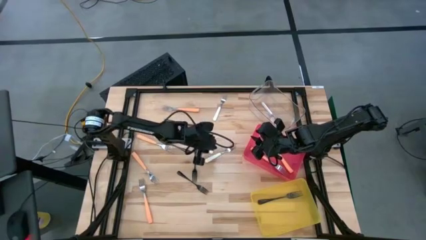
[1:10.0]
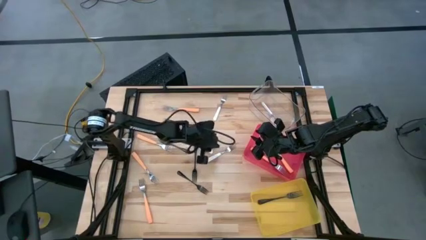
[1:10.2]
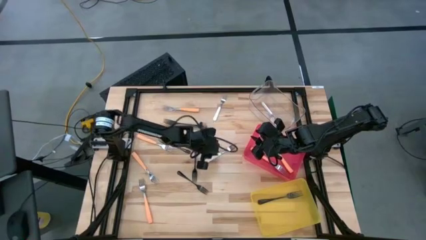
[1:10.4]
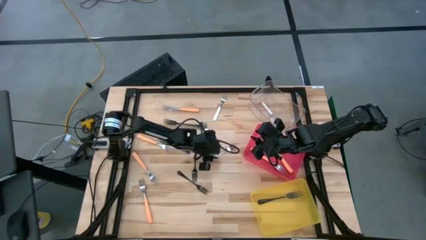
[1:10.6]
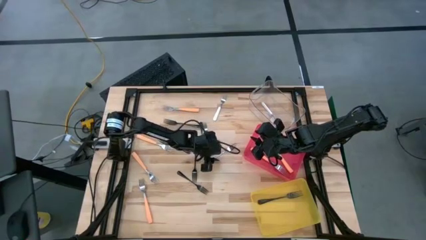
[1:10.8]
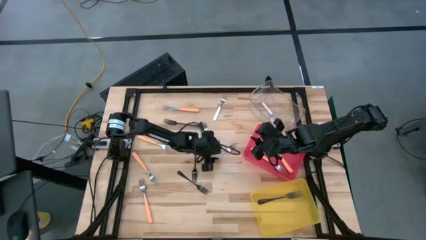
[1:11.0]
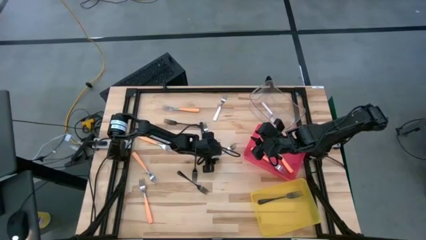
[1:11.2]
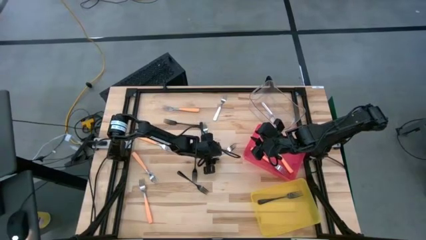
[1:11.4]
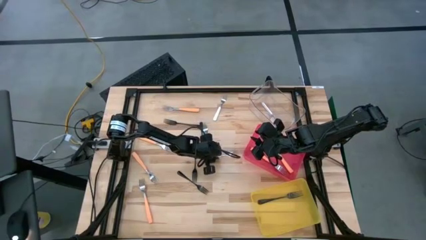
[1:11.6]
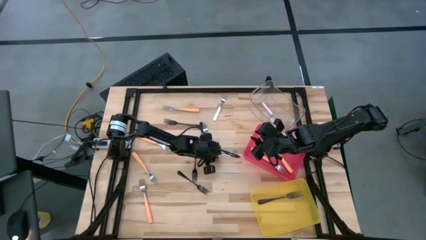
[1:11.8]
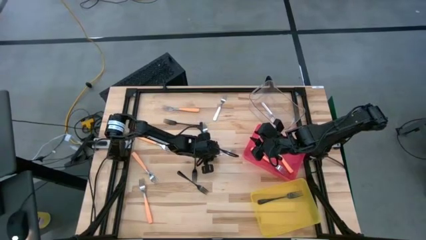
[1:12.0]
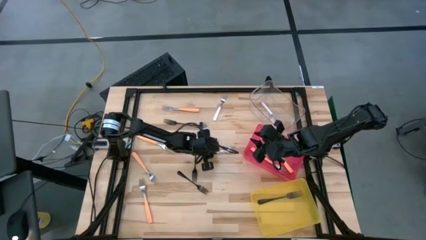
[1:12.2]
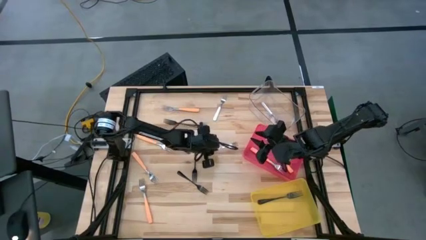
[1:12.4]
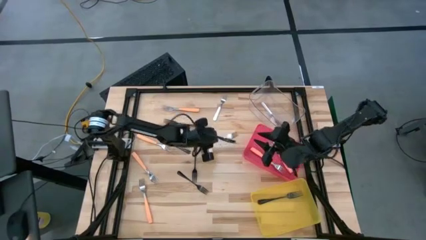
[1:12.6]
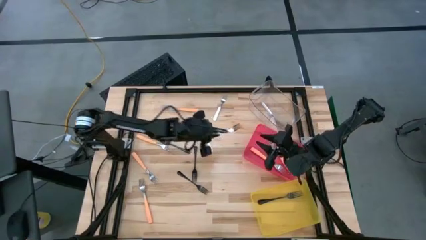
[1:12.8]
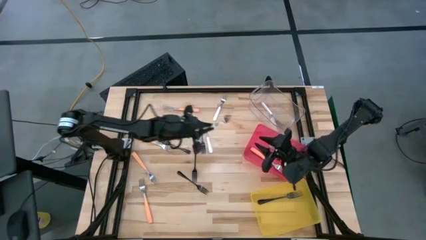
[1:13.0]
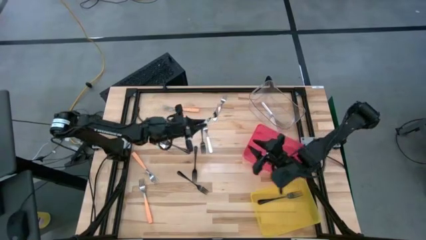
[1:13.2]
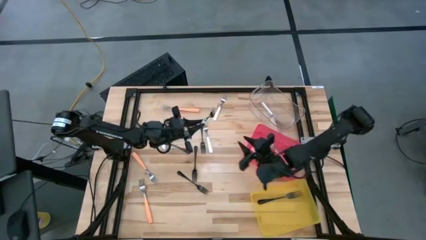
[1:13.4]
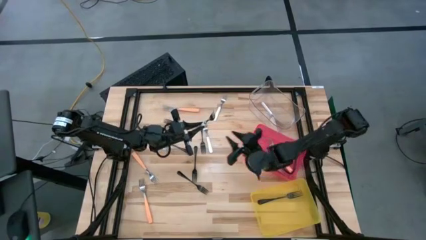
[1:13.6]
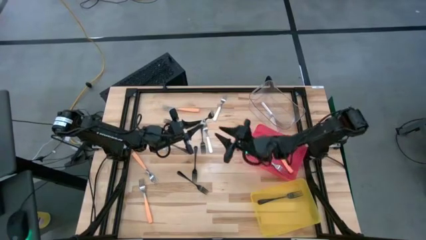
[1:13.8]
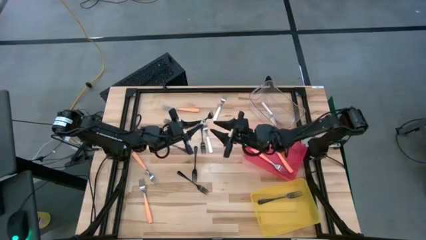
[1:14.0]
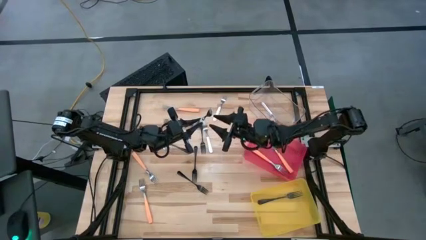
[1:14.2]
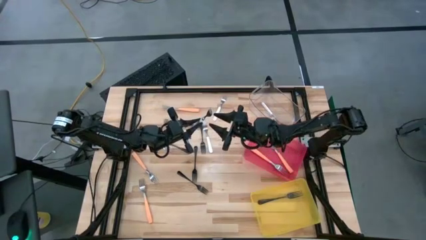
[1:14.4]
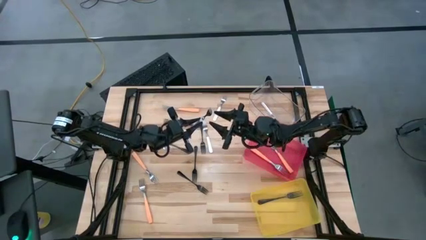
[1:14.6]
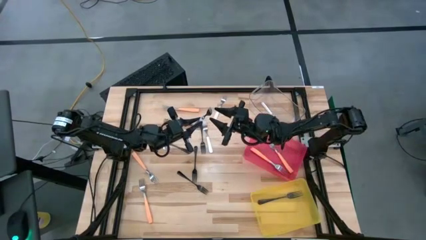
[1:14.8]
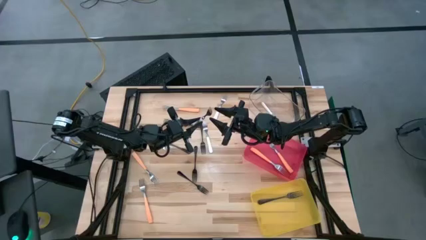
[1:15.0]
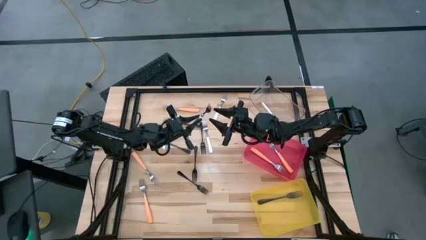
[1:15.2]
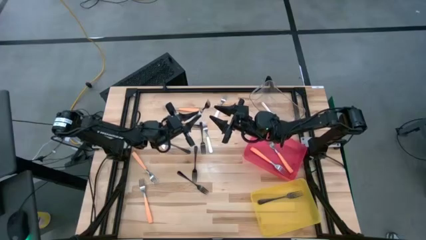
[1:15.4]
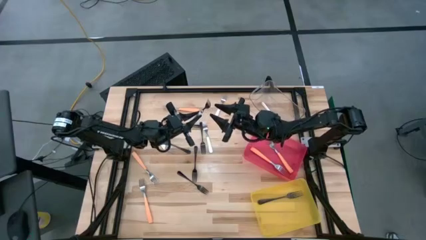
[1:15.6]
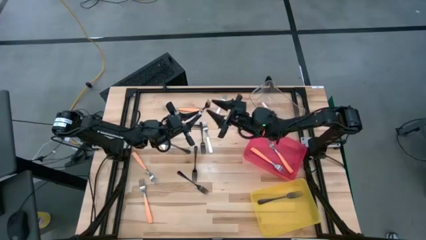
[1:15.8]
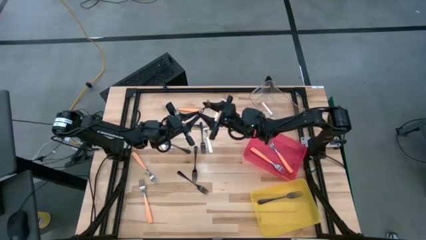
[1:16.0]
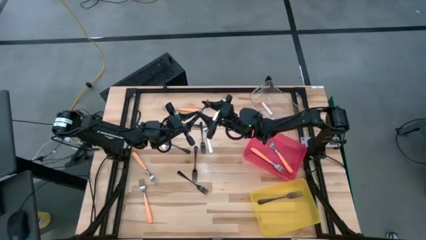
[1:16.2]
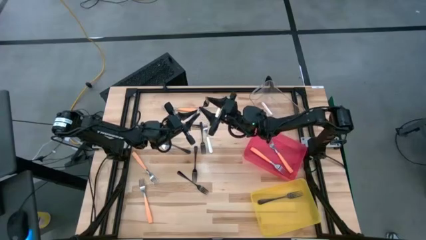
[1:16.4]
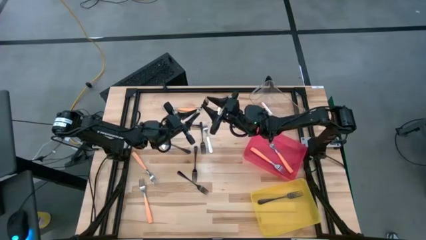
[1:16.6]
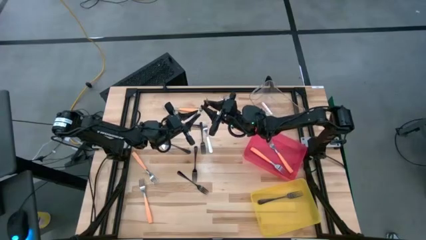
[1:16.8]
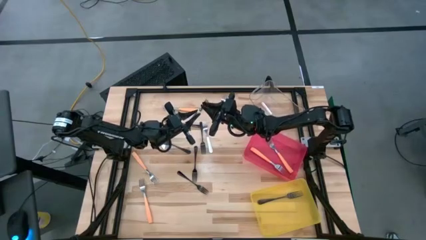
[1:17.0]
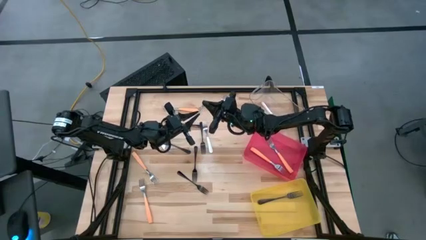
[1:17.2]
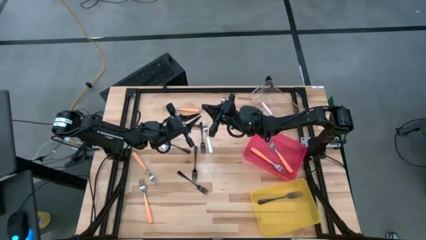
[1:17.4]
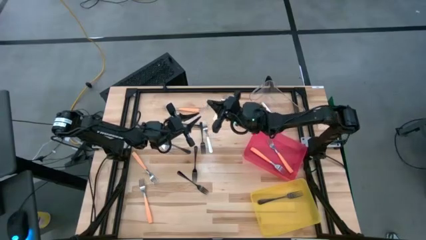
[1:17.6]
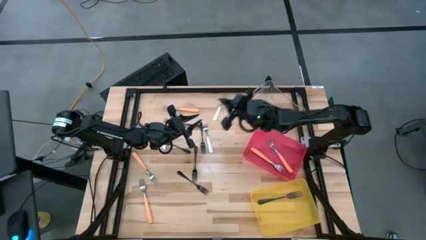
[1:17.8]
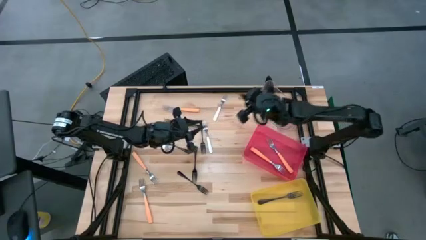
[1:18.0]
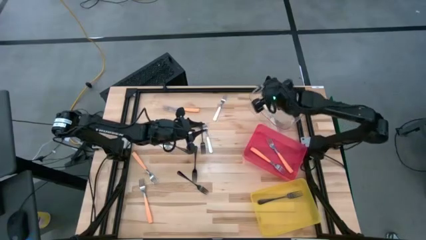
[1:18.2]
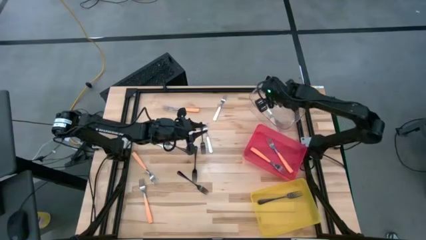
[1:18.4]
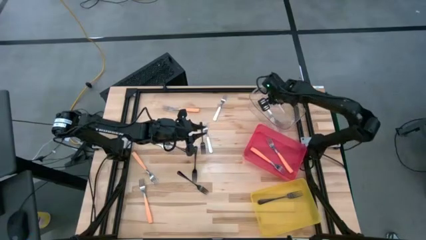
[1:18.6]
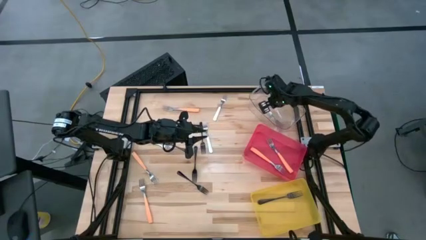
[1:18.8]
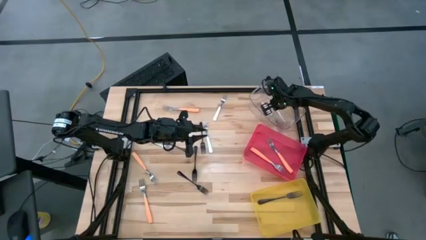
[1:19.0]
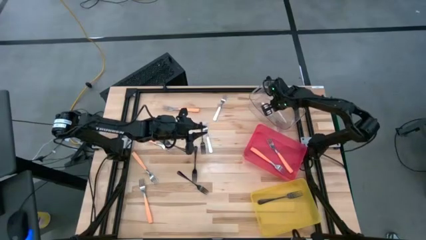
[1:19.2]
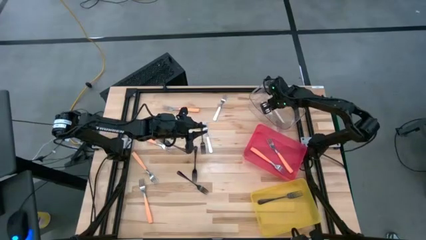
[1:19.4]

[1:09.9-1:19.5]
Task: Sort silverware by color (type)
Put the white fork into the transparent bin

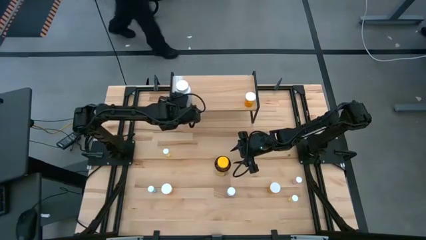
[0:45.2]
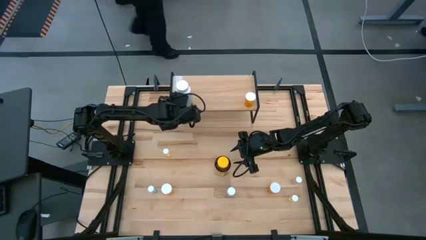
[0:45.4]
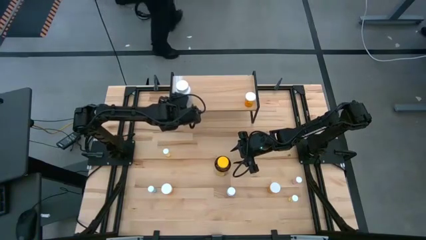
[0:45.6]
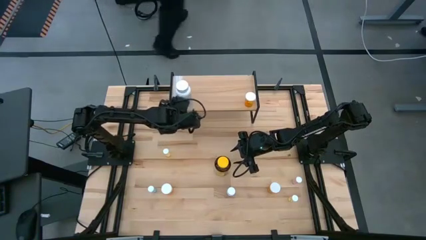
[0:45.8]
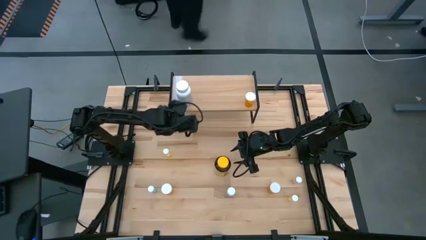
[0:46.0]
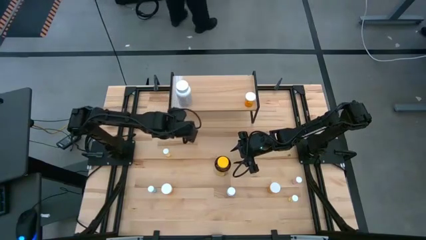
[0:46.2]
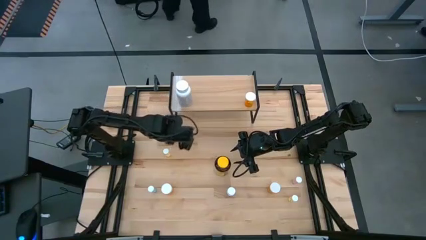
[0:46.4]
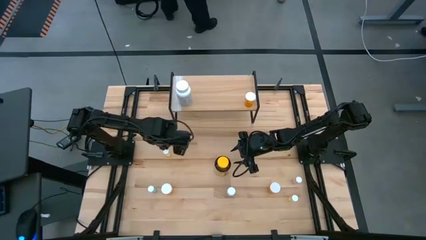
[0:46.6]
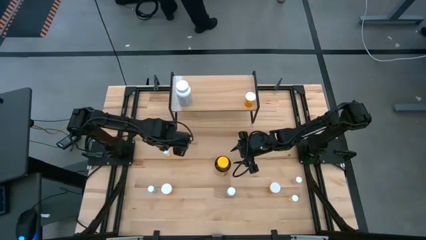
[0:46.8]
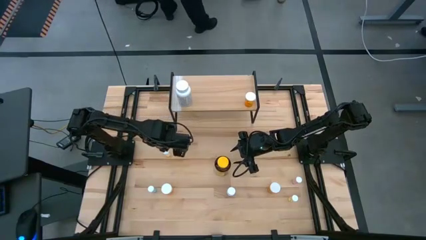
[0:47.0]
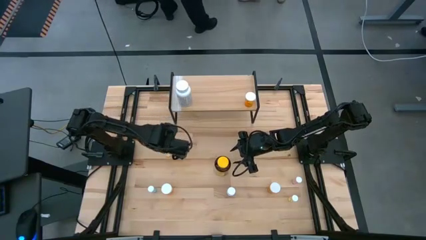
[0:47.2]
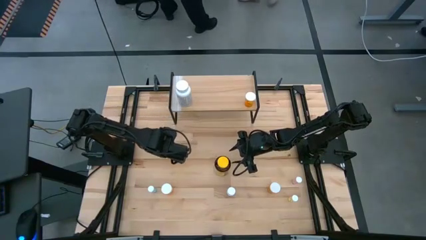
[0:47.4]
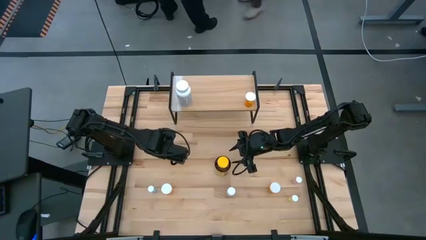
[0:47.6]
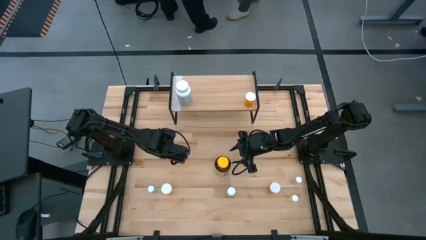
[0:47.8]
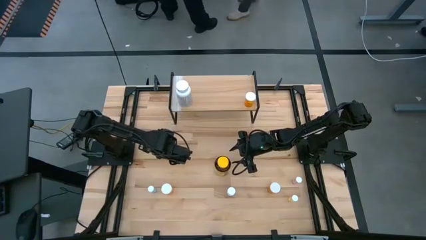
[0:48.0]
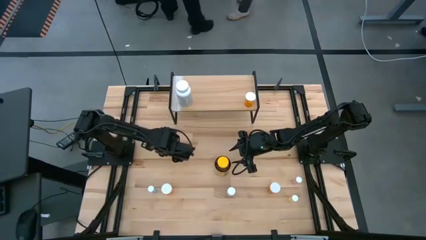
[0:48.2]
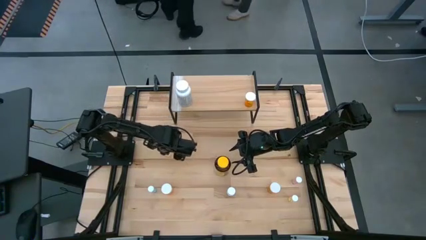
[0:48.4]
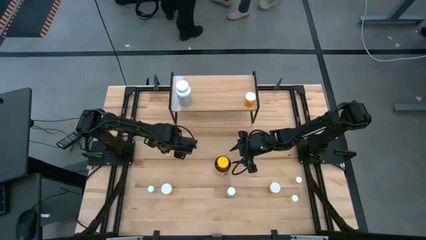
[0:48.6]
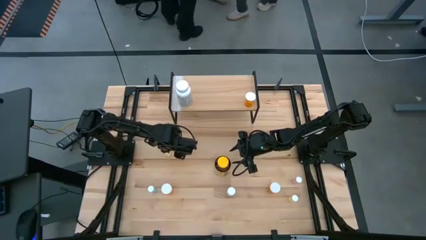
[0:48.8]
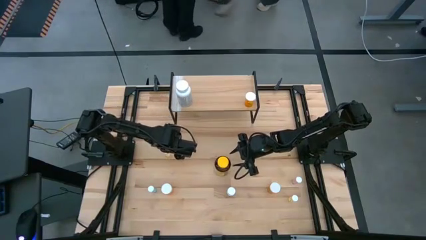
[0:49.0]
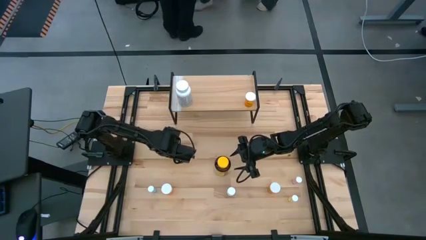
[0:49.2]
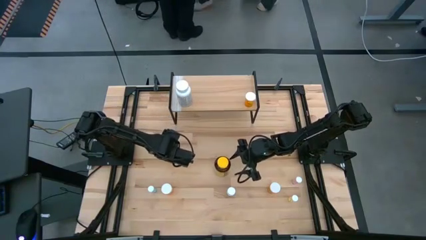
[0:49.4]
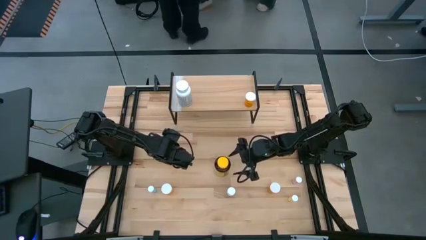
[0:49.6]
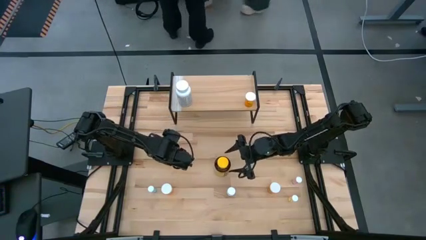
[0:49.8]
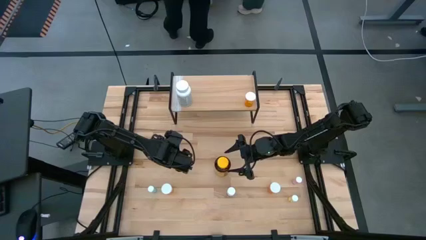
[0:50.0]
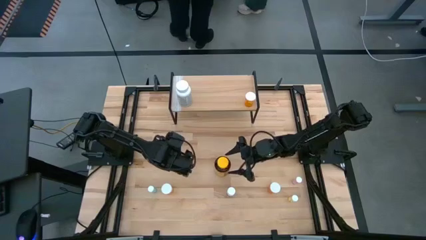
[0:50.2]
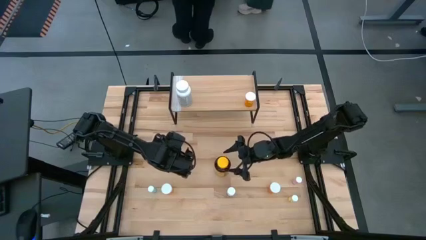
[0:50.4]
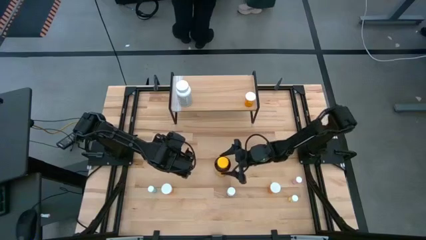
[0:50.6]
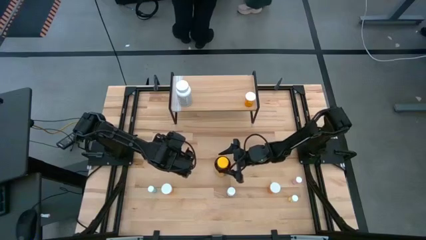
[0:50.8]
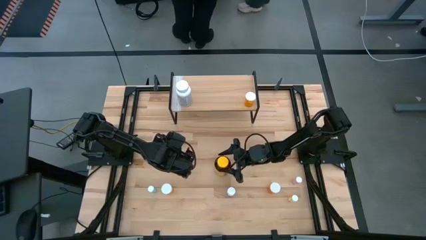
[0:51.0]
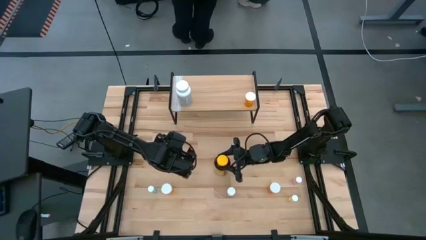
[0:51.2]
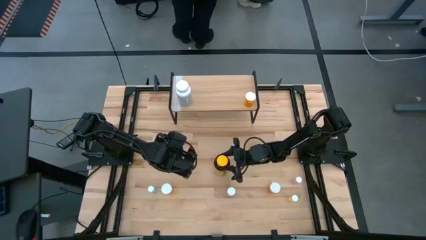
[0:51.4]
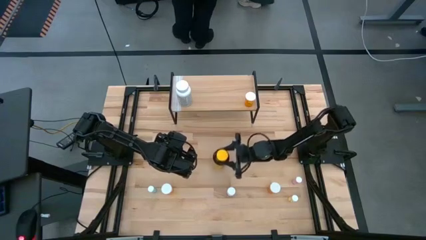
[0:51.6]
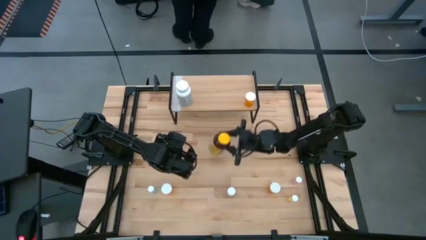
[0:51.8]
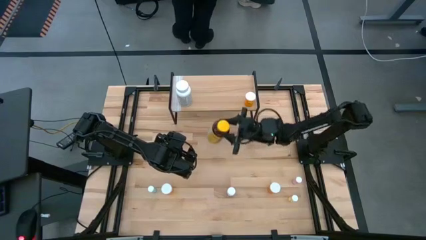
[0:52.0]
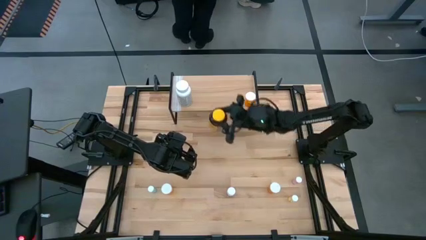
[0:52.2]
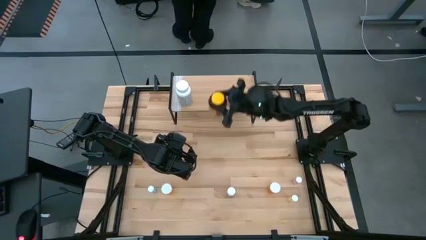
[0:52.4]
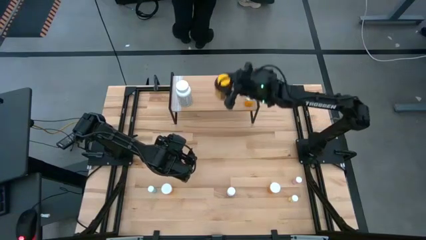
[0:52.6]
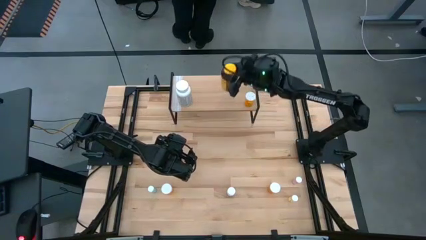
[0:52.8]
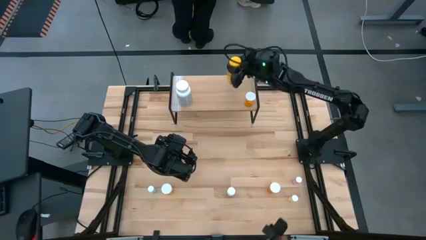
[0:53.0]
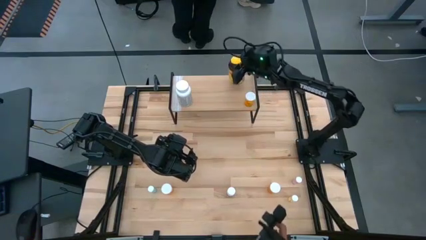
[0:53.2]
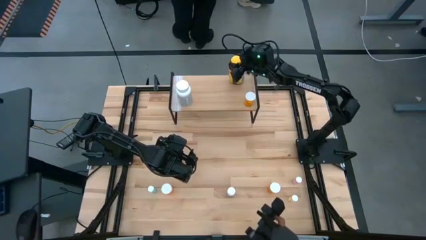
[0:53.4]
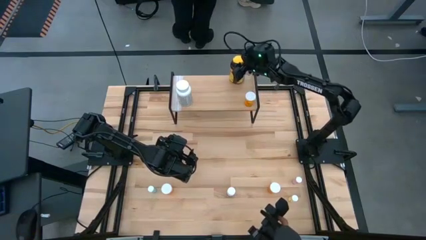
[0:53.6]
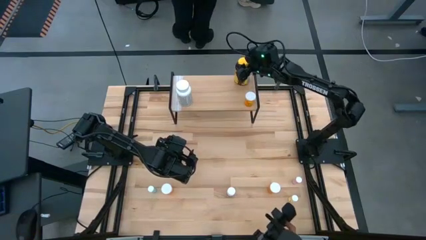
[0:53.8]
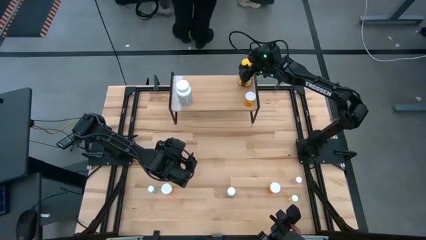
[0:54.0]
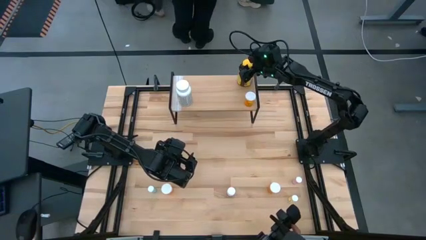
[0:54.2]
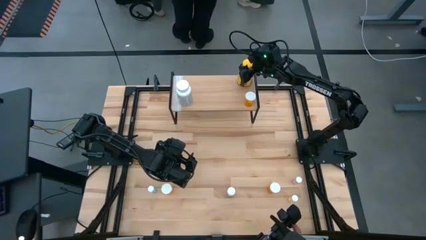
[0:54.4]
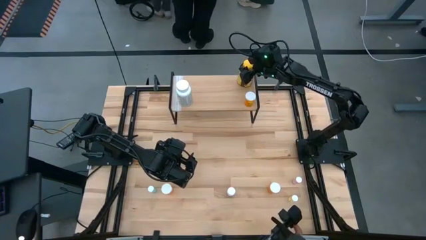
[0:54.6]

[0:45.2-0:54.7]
Task: Pick and place medicine bottles onto shelf by color
Put the big yellow medicine bottle on the shelf
